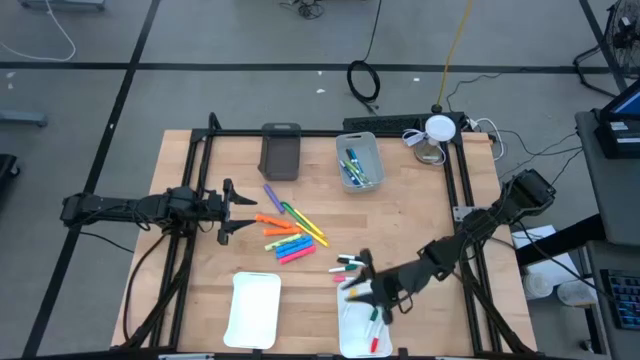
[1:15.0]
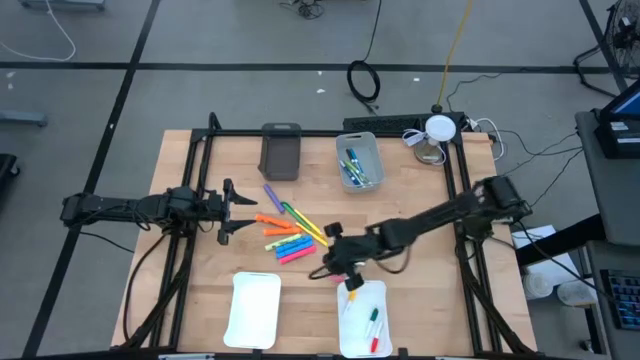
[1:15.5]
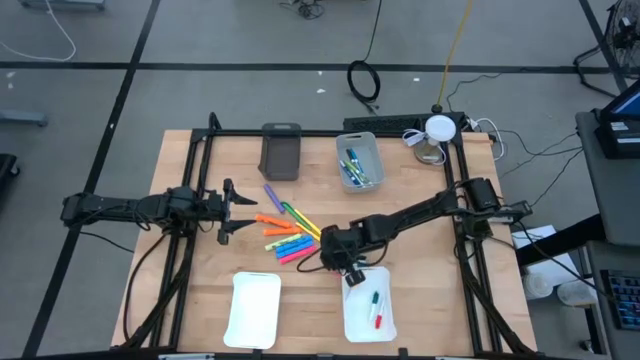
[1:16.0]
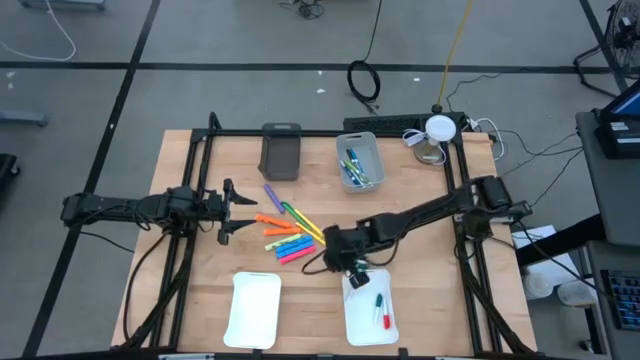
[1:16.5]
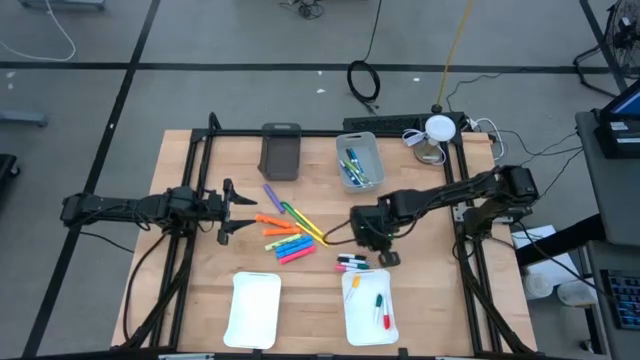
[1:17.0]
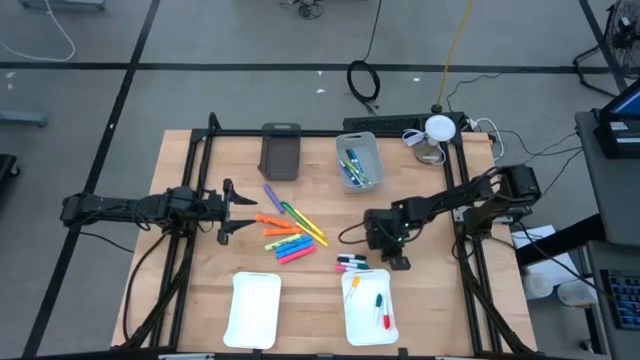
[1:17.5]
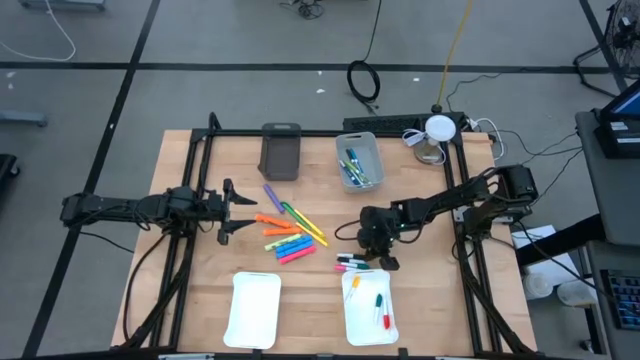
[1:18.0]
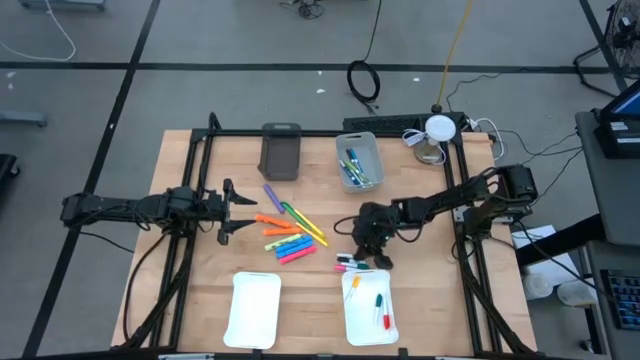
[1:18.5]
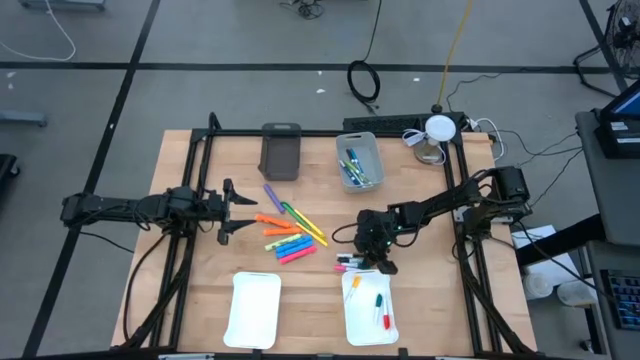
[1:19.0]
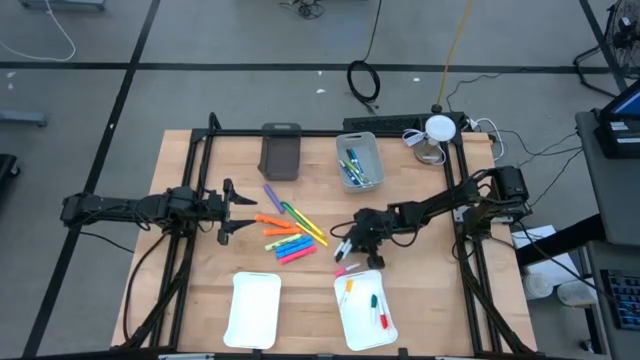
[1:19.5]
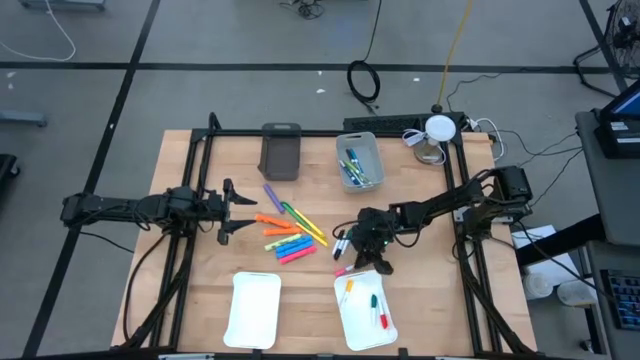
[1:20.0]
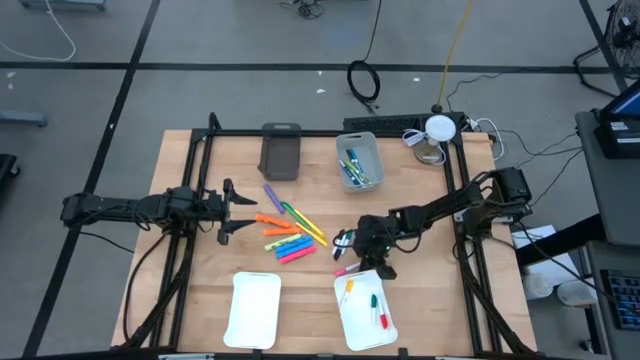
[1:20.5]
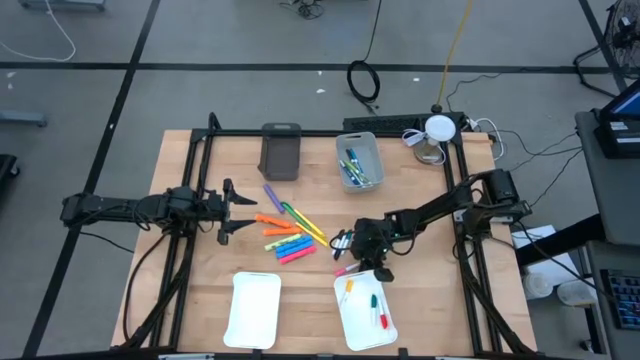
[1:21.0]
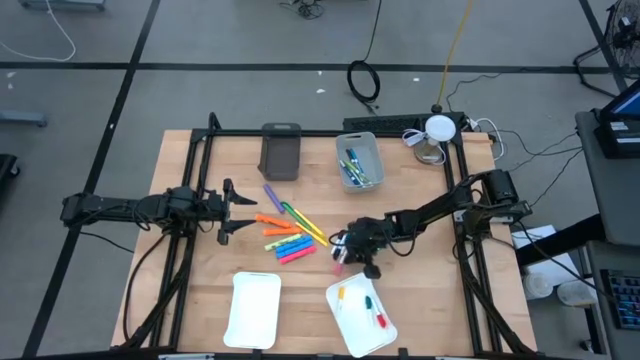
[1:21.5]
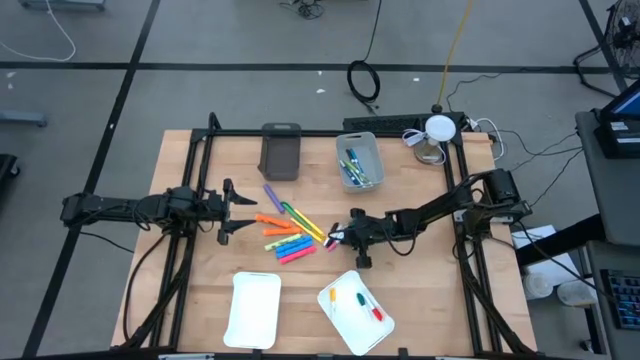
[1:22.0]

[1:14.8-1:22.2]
Task: Pick & Place Markers
Adjust the highlighter pens on the table

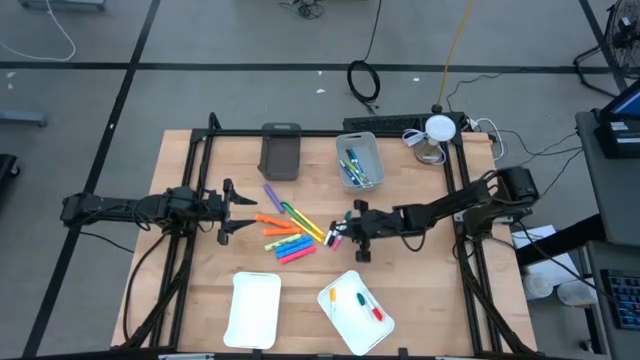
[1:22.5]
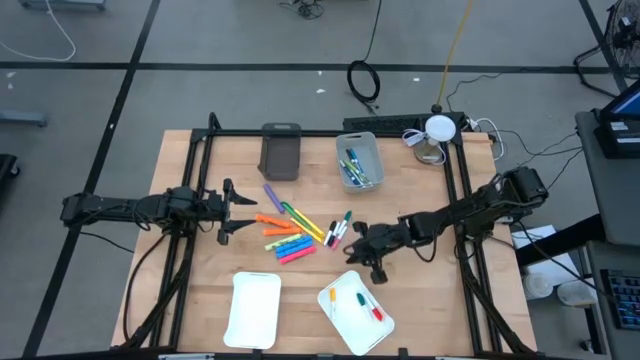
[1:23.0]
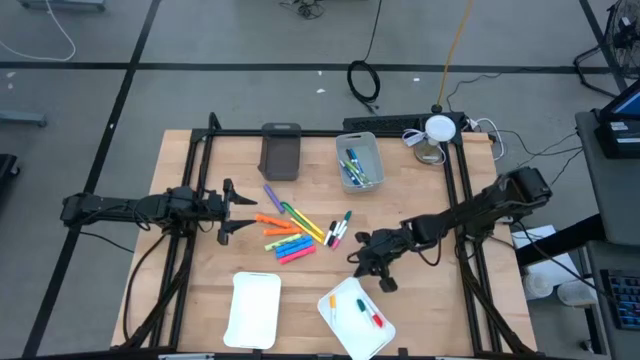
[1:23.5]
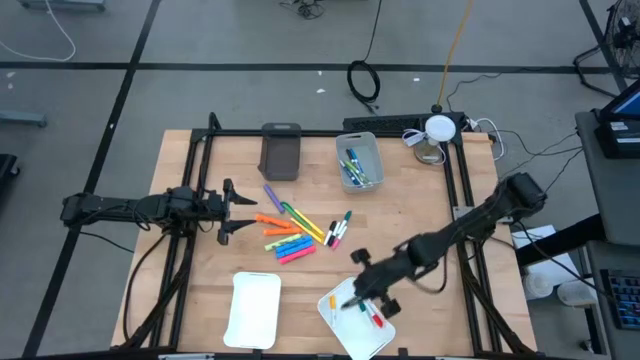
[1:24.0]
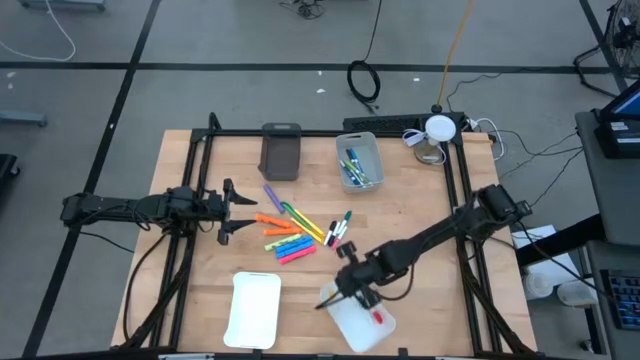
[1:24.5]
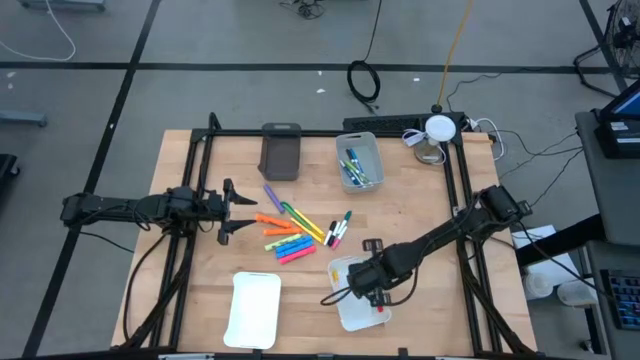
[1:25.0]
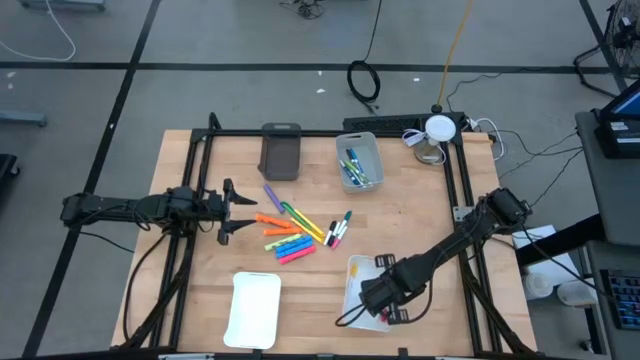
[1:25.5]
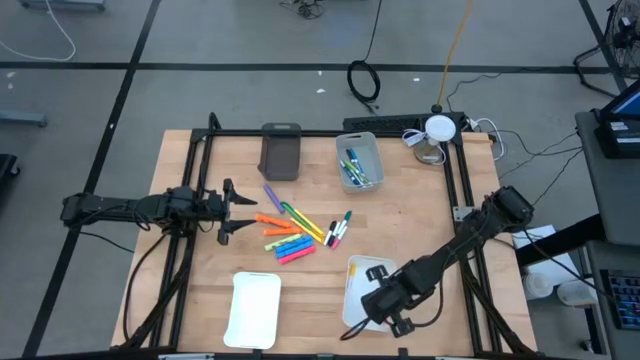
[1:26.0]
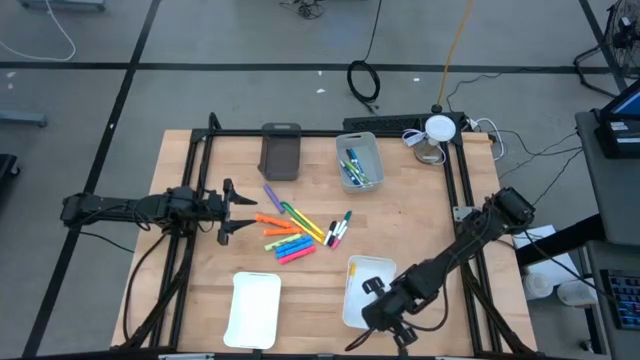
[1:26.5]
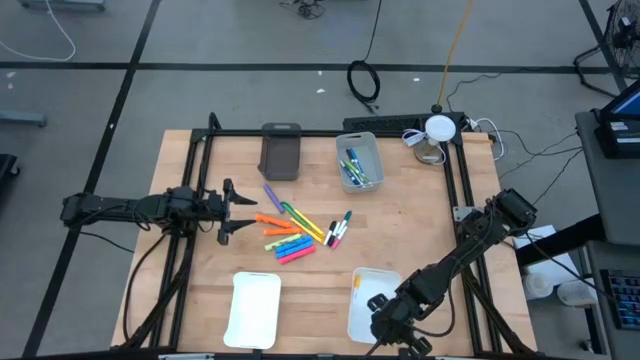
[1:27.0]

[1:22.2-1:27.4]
Move the right white bin to the bottom right of the table

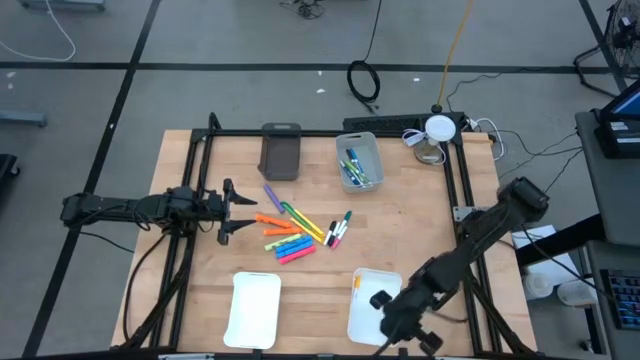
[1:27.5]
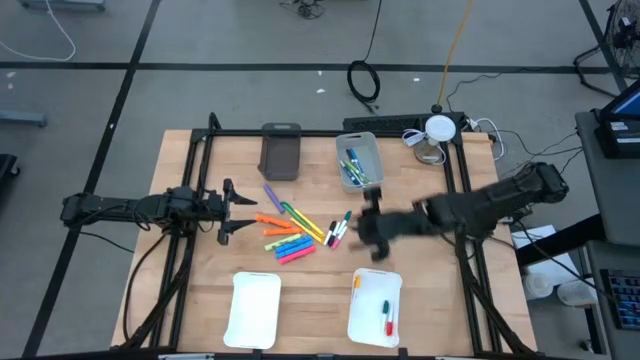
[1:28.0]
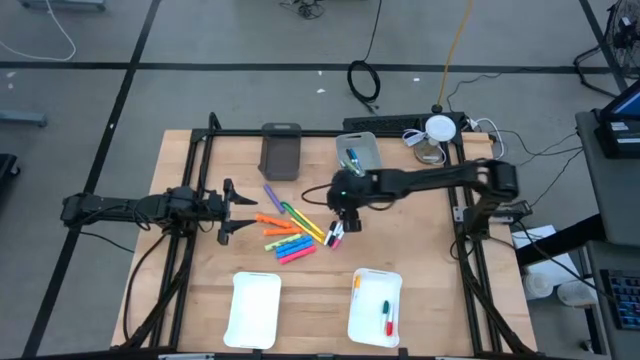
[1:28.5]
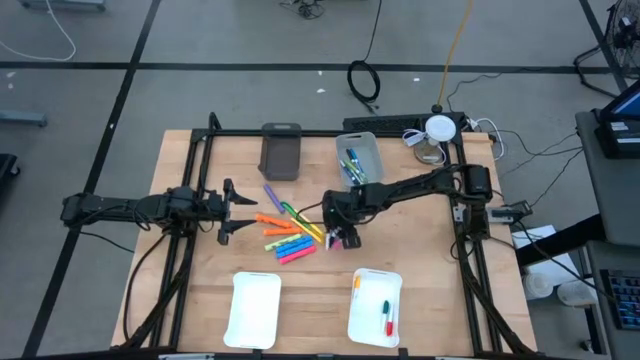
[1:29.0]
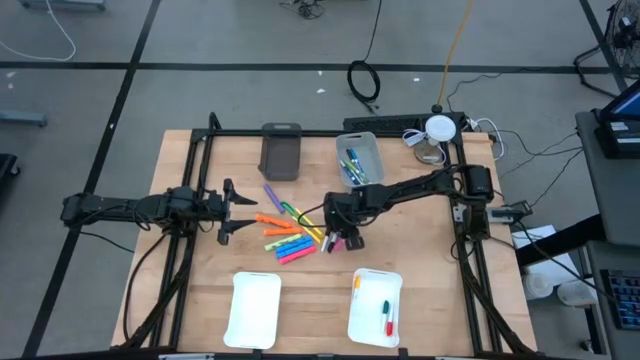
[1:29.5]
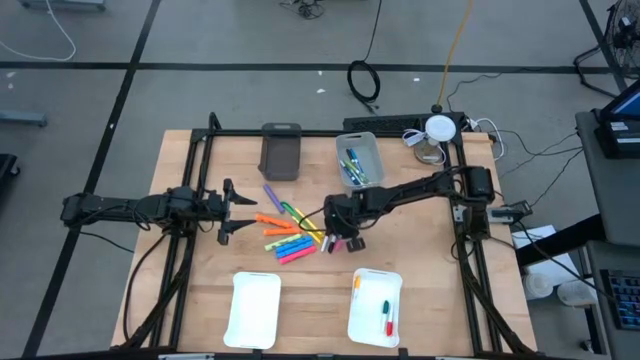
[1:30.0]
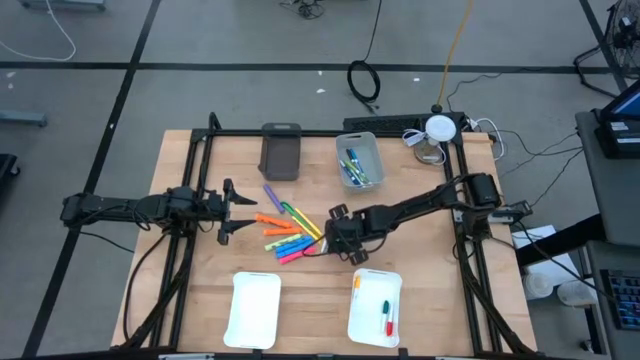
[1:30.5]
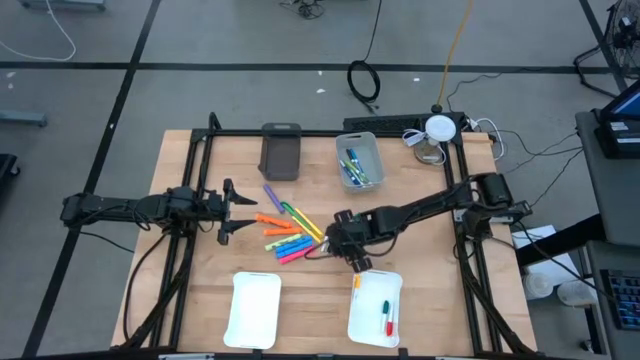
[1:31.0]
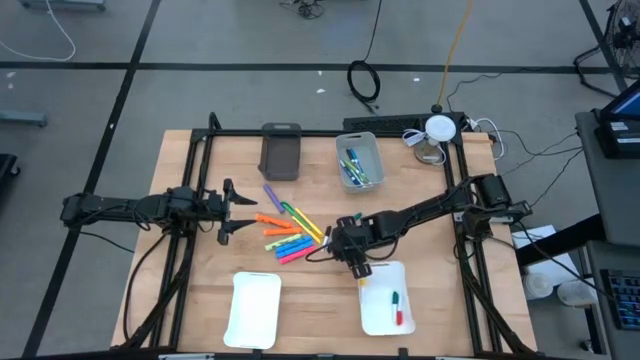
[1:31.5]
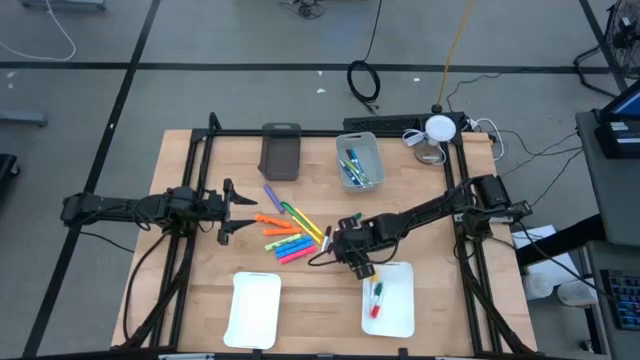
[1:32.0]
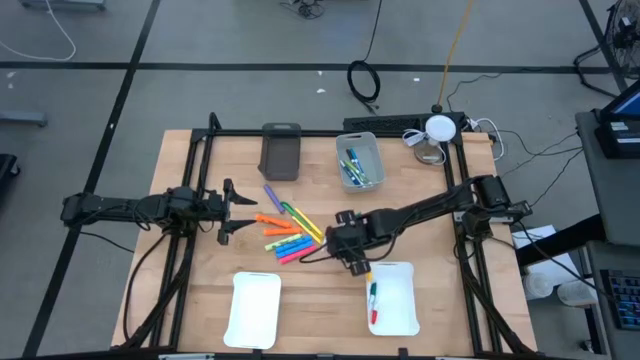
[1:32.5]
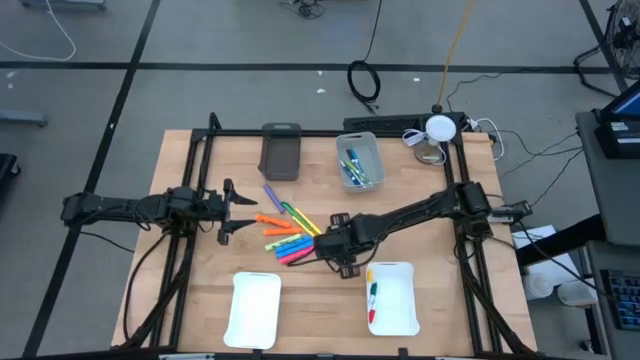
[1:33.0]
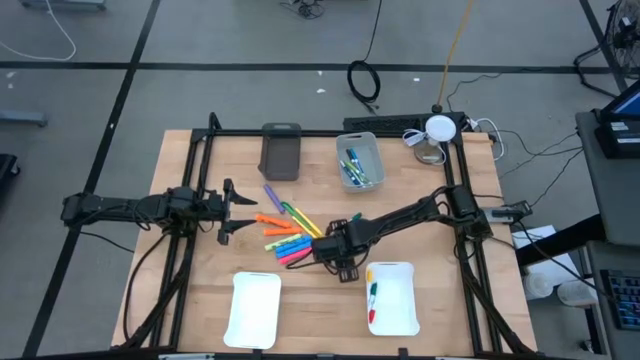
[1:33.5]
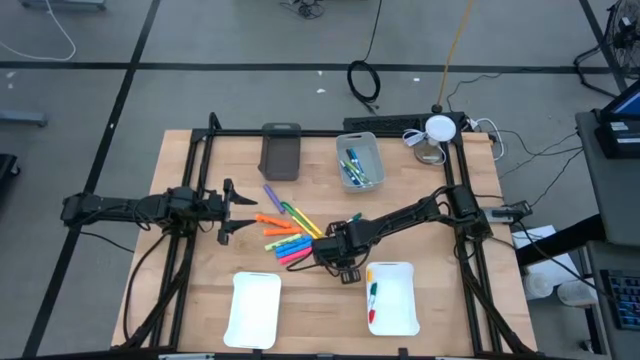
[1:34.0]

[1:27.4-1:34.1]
Put the pink highlighter pen into the right white bin

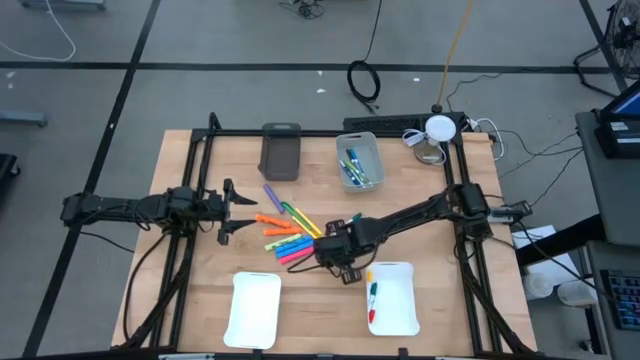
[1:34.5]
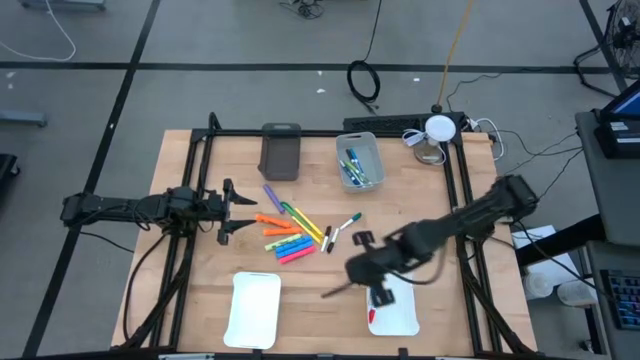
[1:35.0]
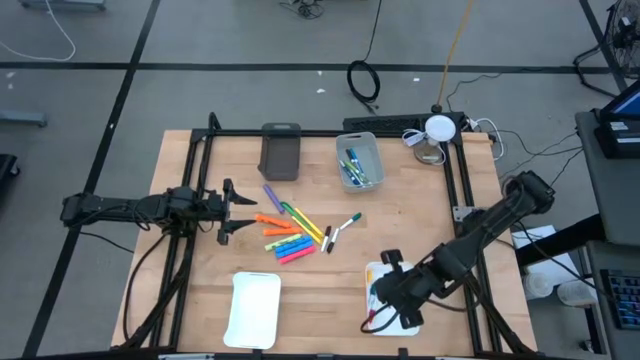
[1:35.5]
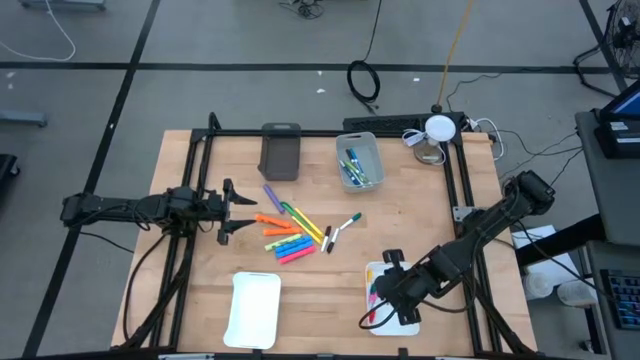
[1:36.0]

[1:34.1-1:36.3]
Put the pink highlighter pen into the right white bin
